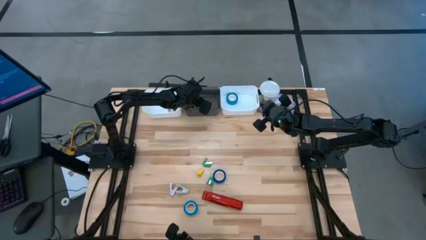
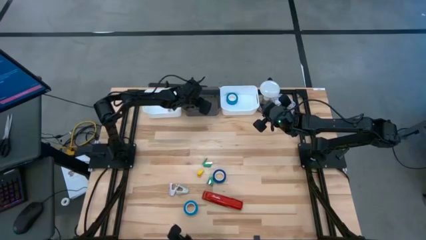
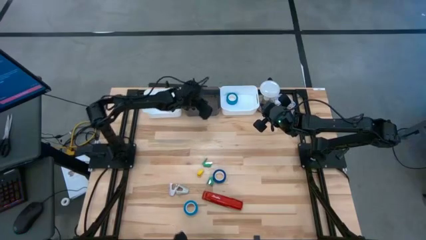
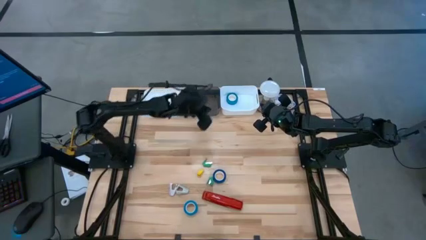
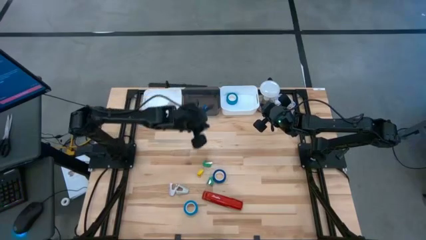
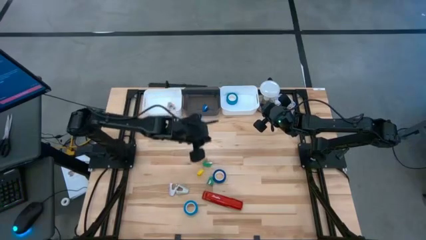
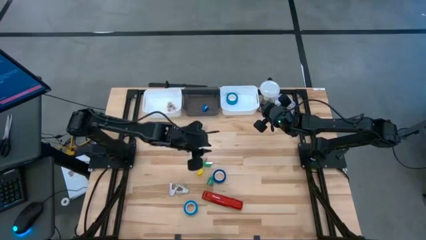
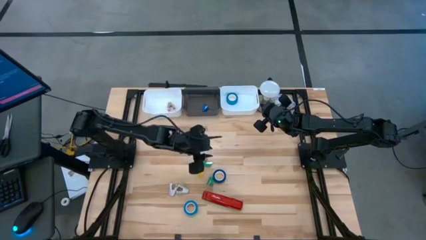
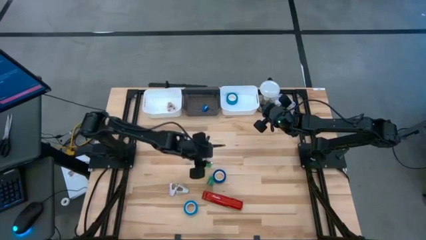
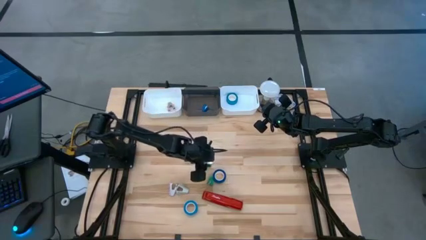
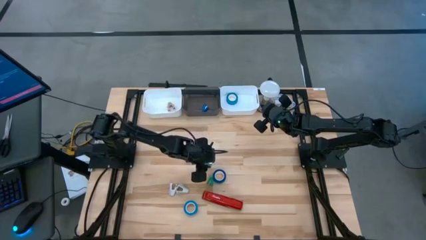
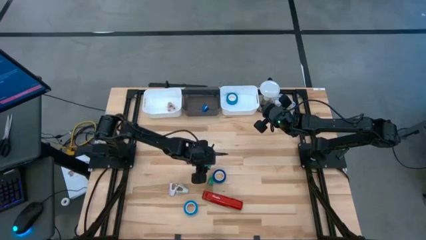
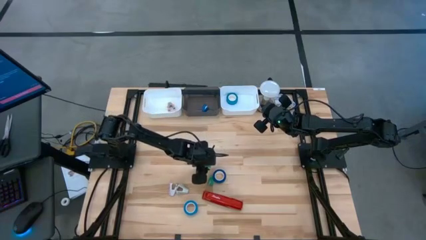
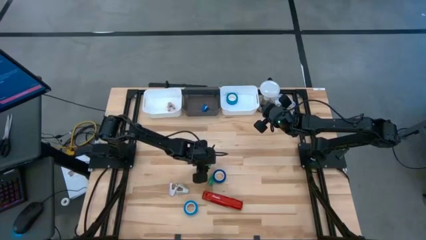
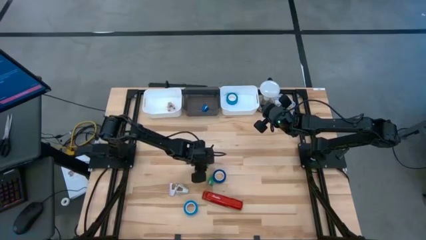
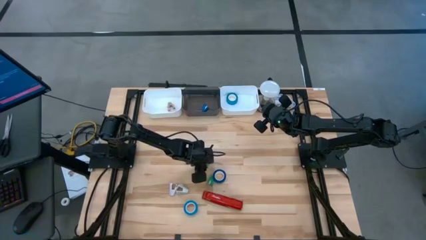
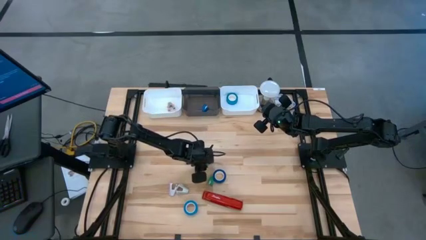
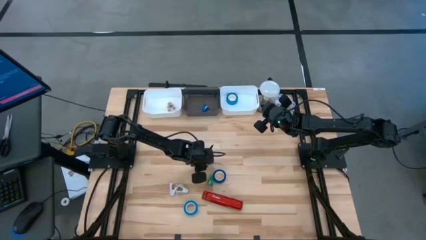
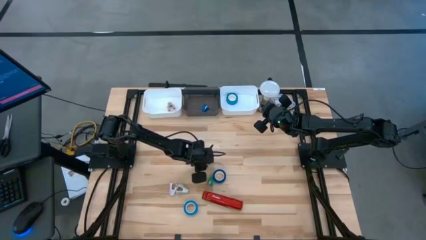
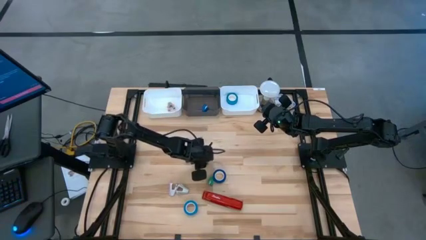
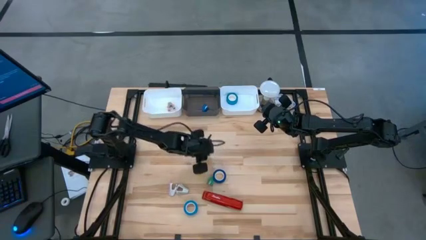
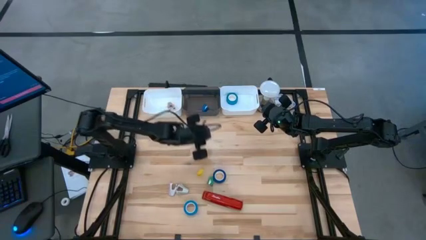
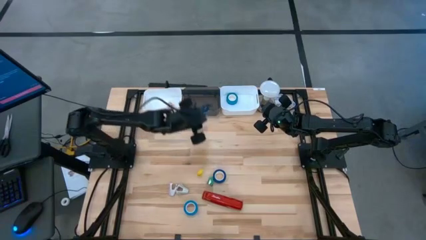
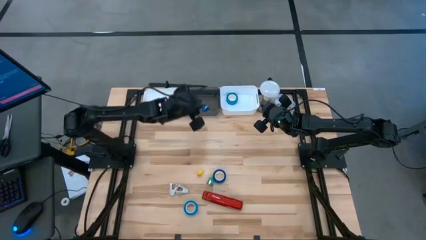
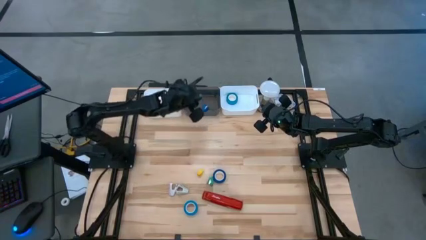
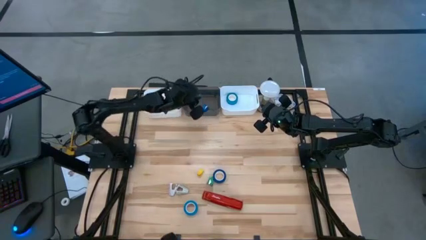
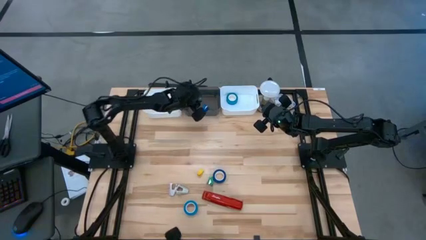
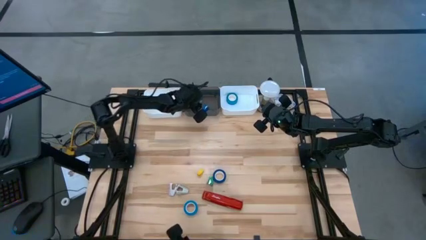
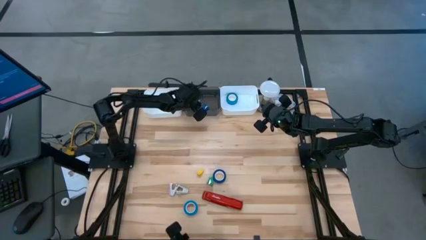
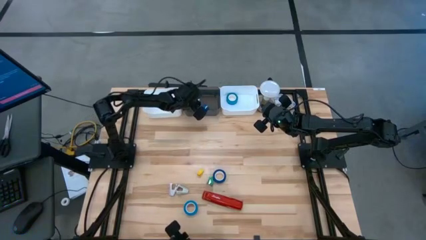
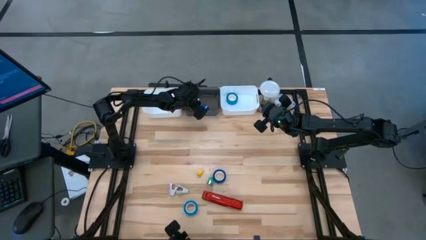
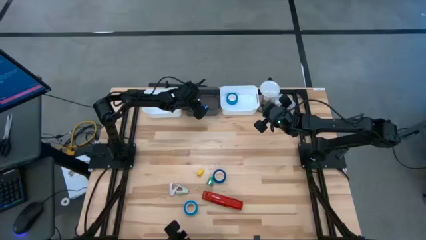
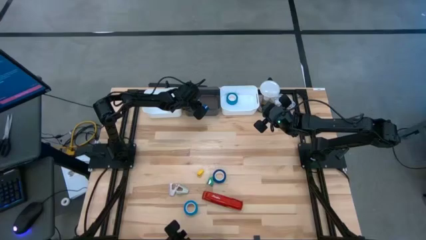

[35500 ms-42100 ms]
Task: Pick and place Stapler, Stapler remover, tape
Put the top green stapler into the black bin

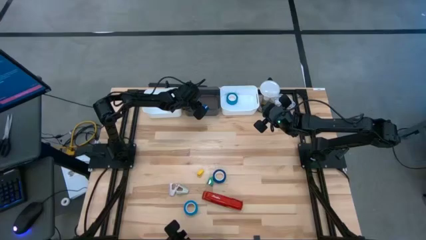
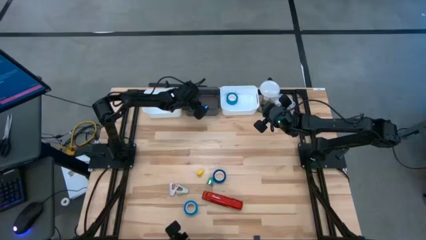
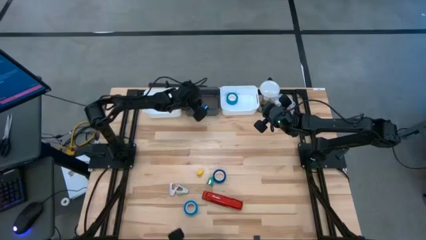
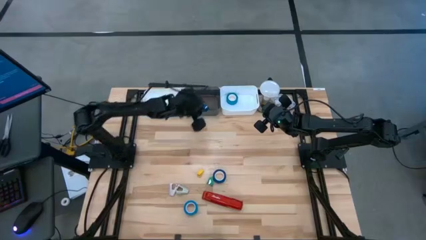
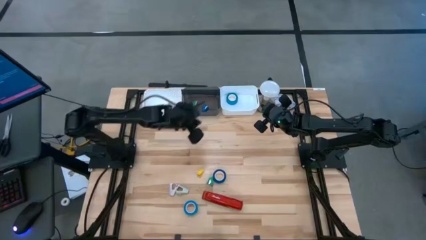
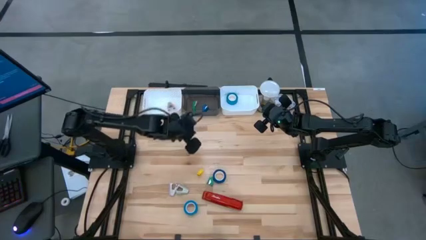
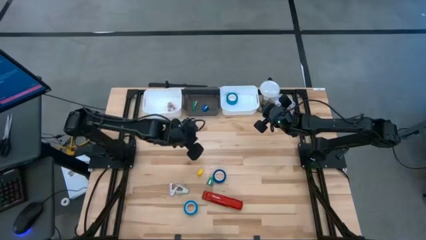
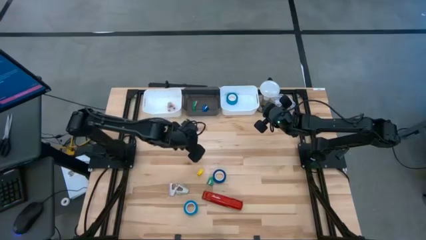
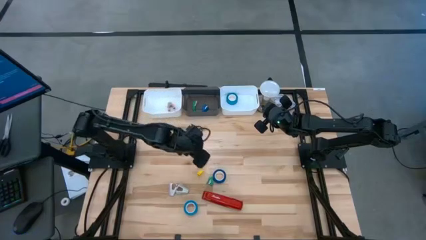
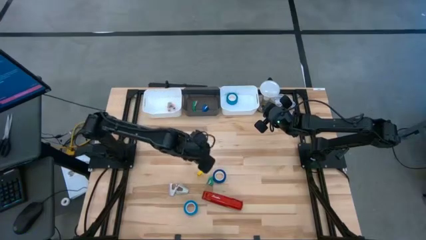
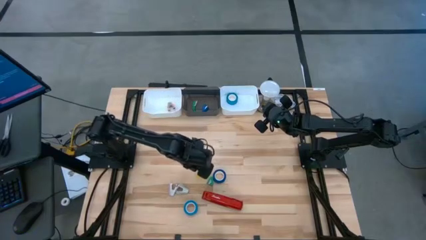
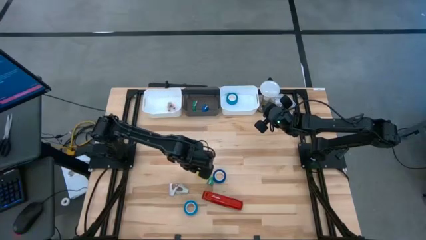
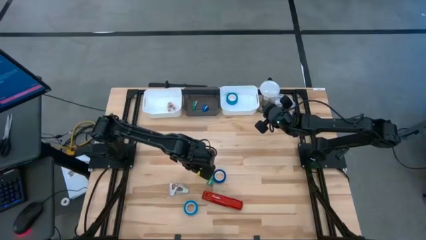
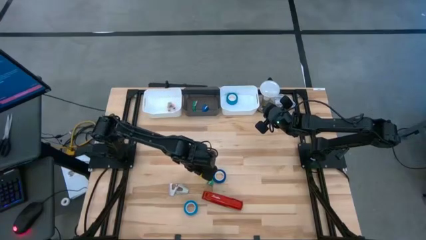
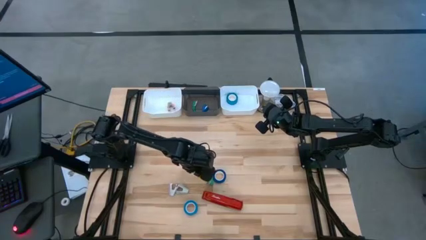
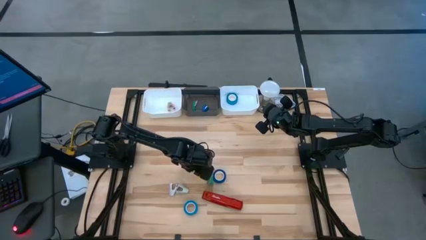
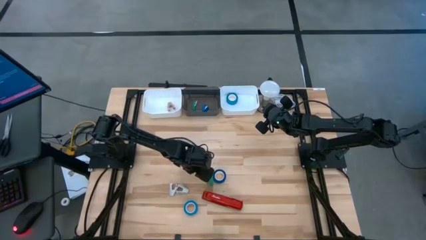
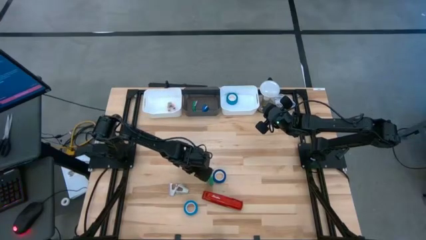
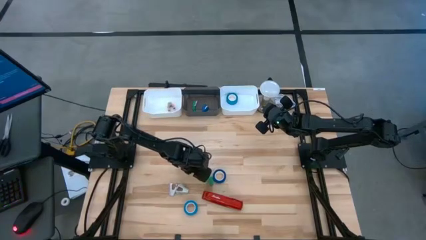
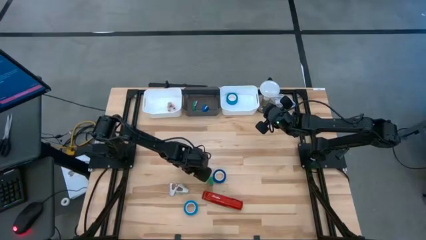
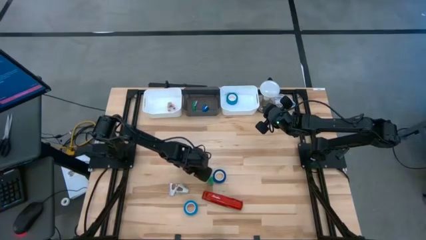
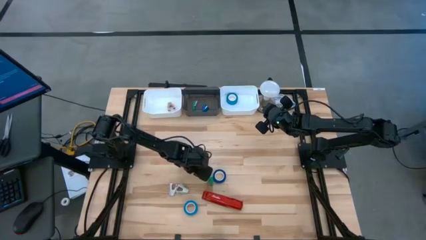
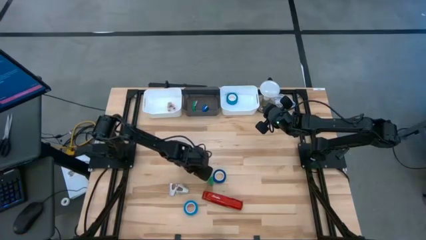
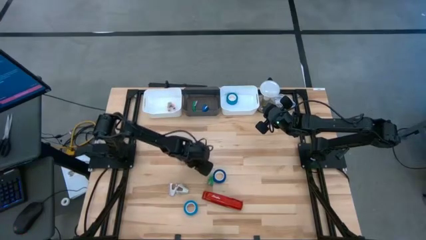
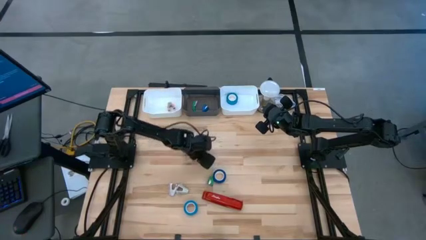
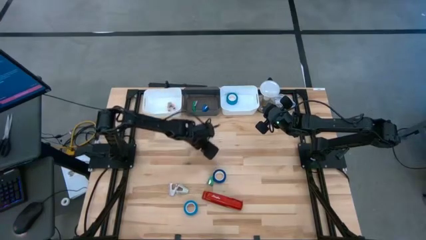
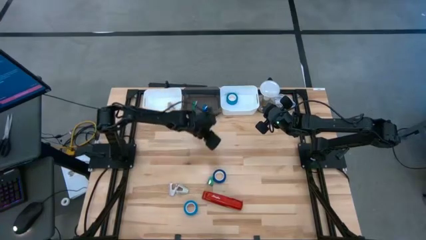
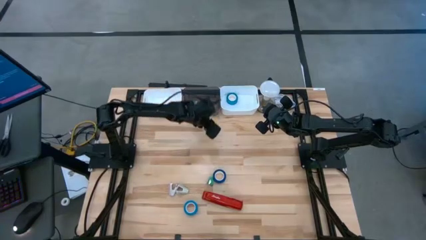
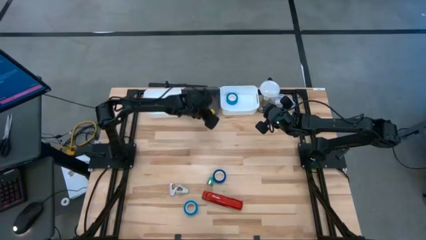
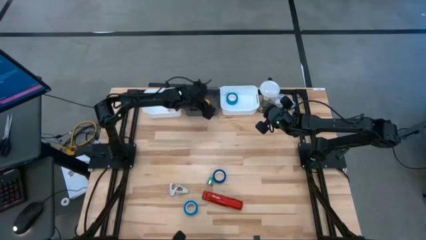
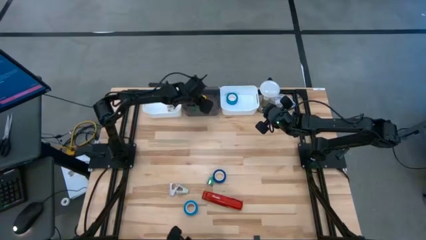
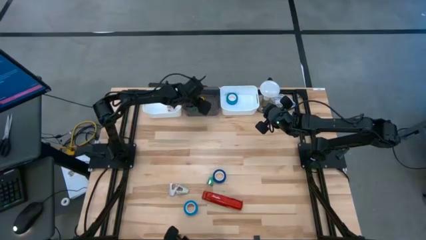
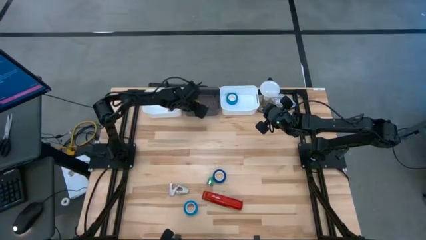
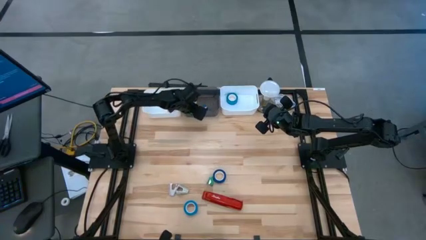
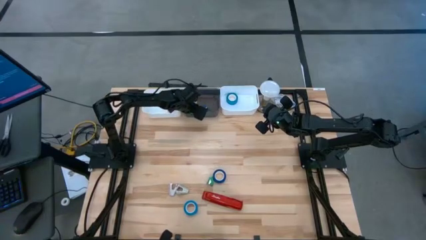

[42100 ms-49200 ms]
Put the yellow stapler into the black bin

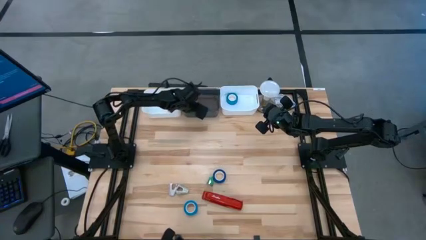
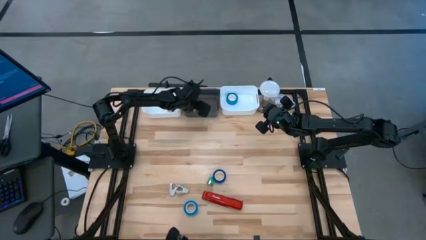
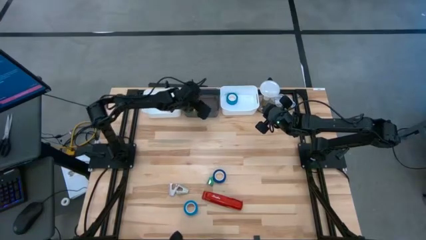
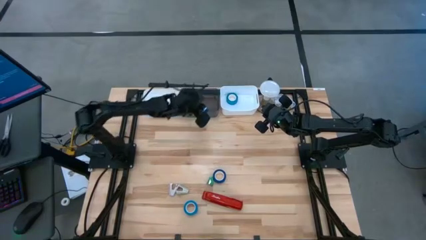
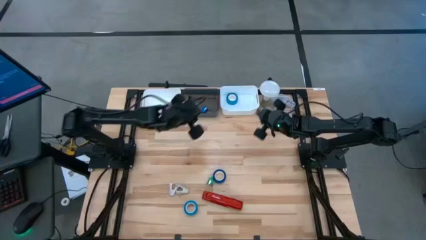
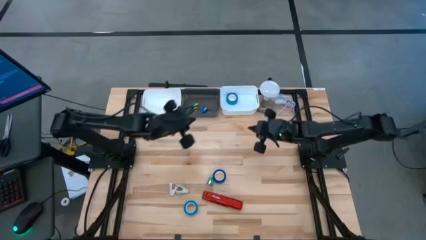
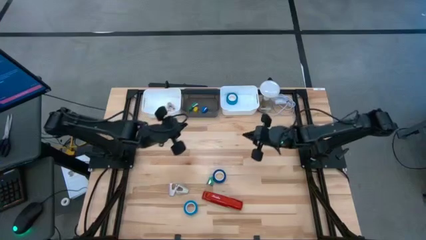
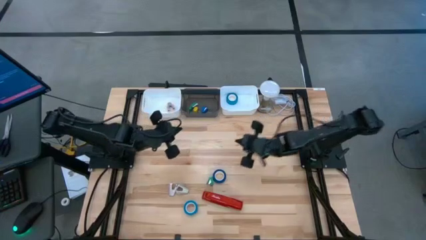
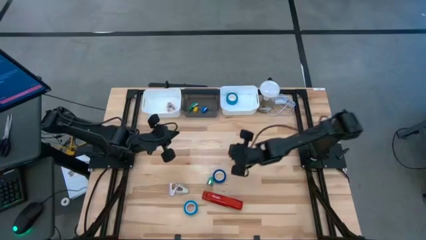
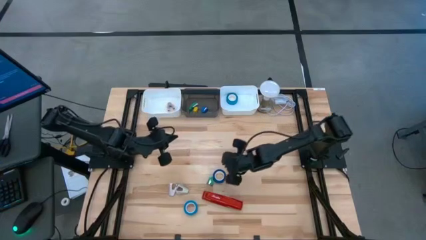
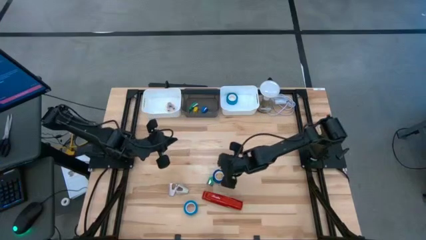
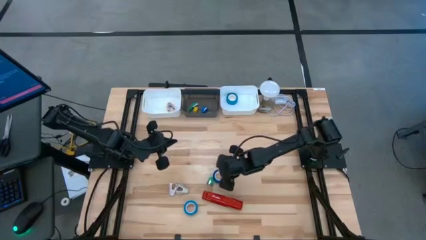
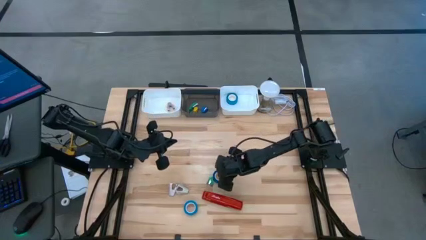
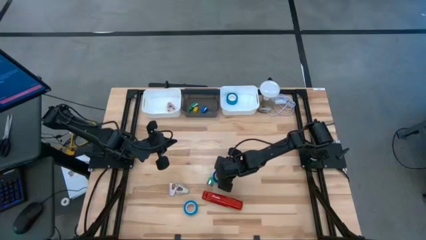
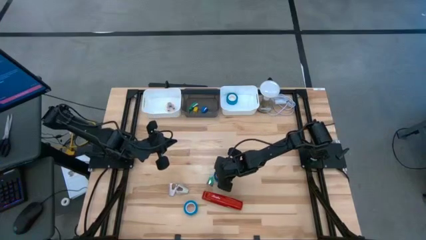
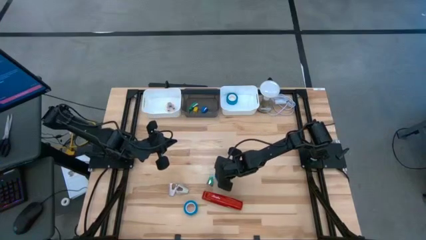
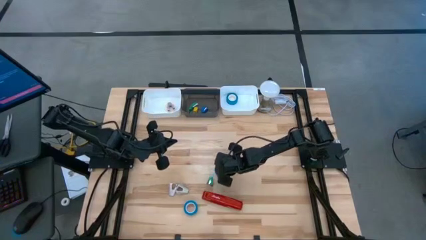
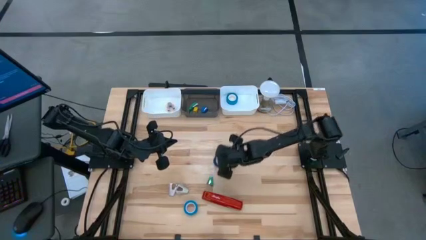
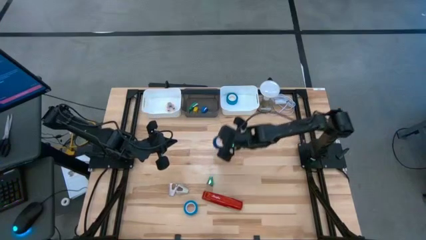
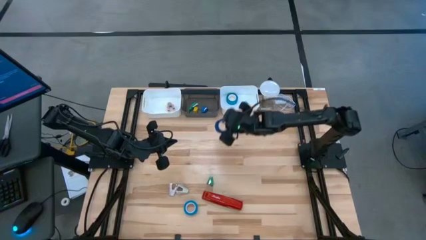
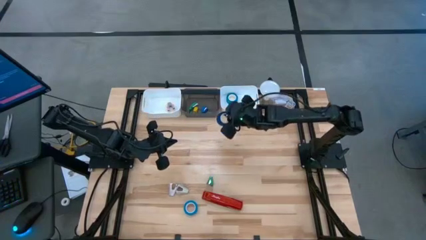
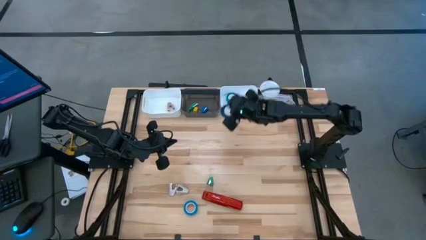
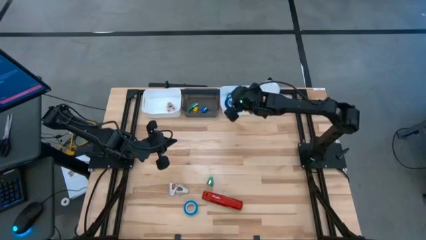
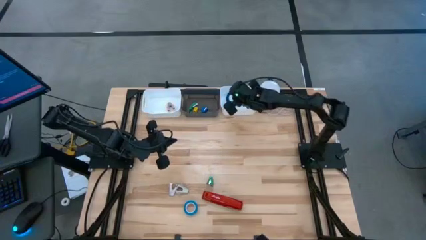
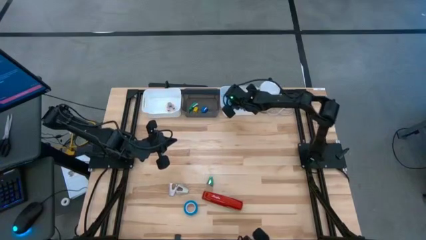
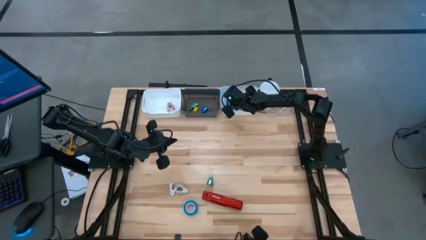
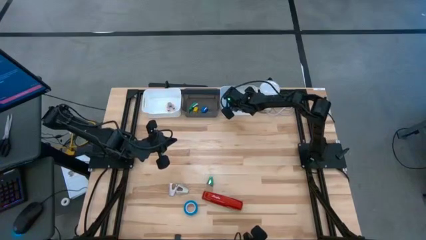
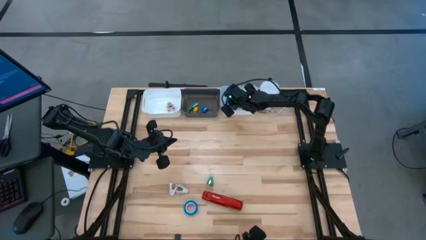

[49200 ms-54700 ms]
Put the blue tape into the right white bin
